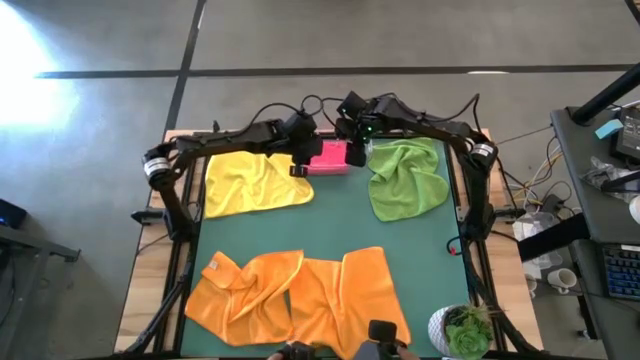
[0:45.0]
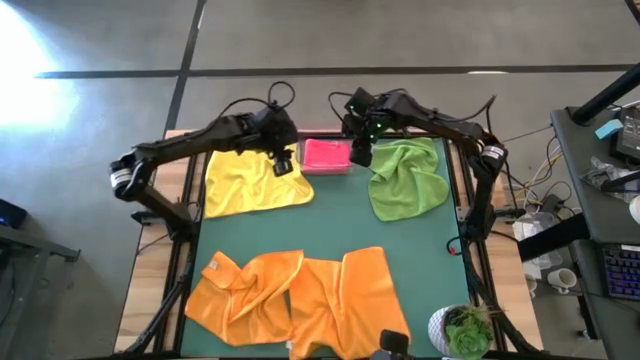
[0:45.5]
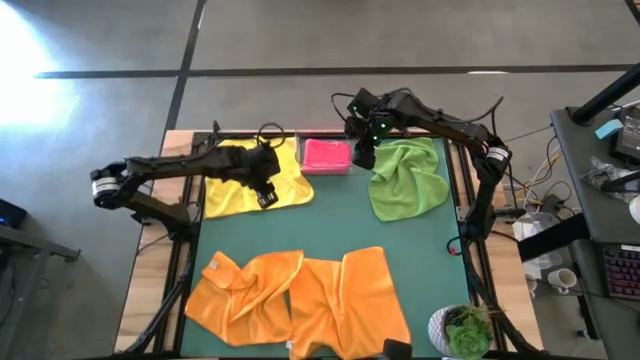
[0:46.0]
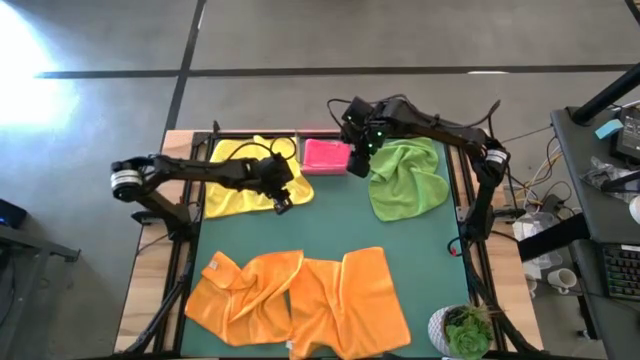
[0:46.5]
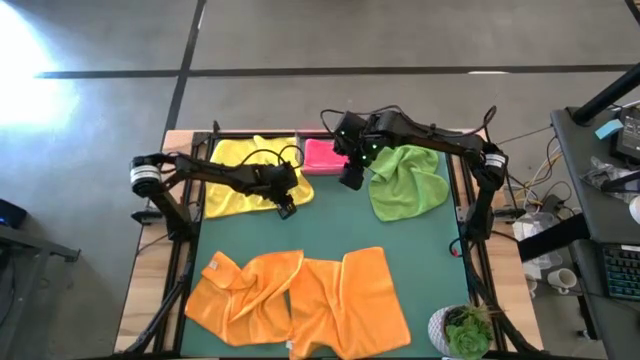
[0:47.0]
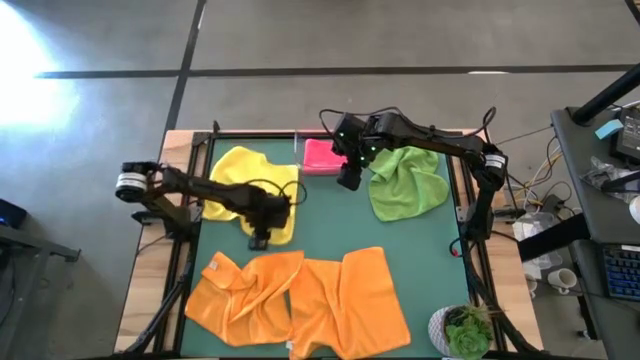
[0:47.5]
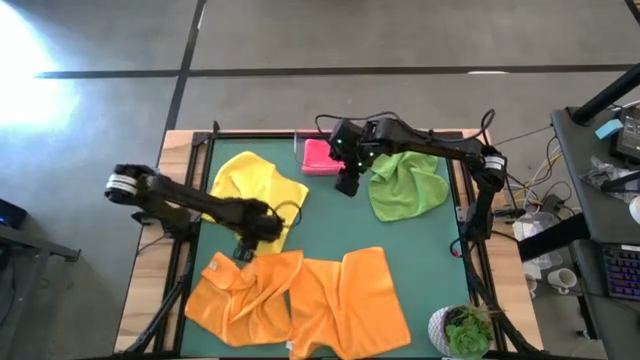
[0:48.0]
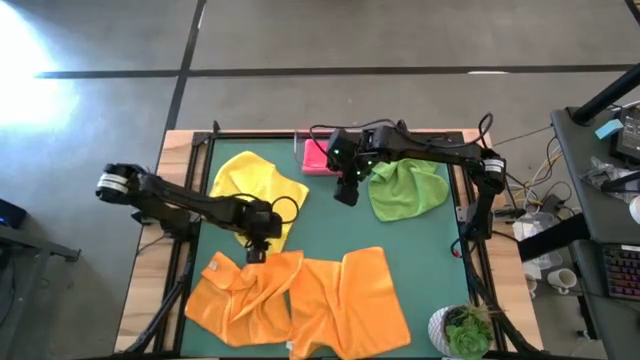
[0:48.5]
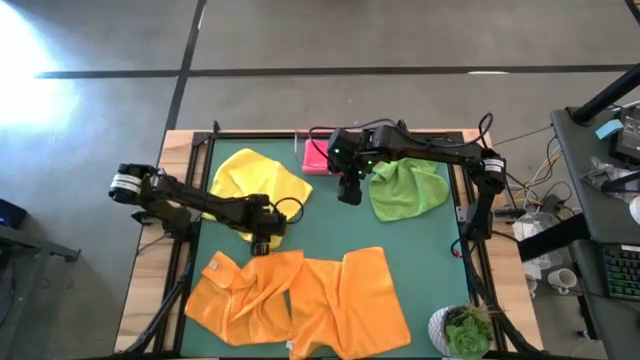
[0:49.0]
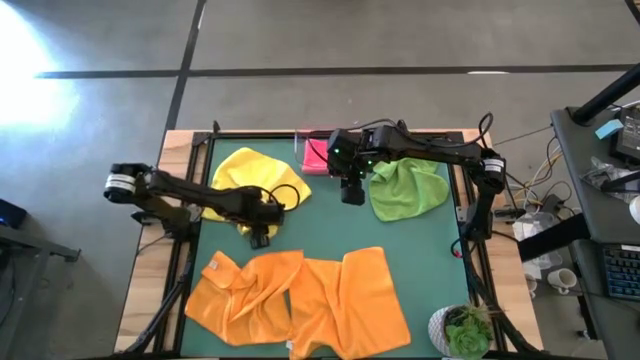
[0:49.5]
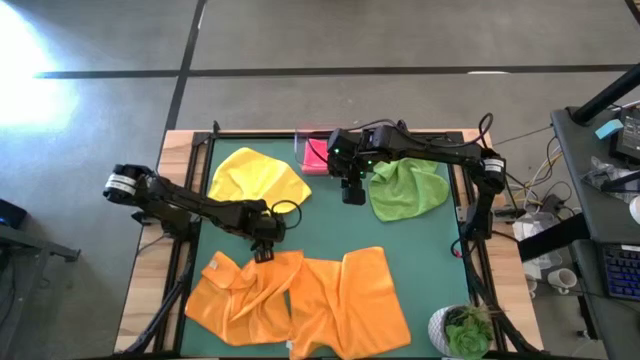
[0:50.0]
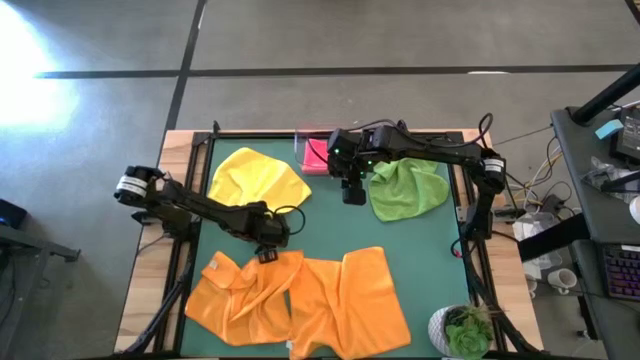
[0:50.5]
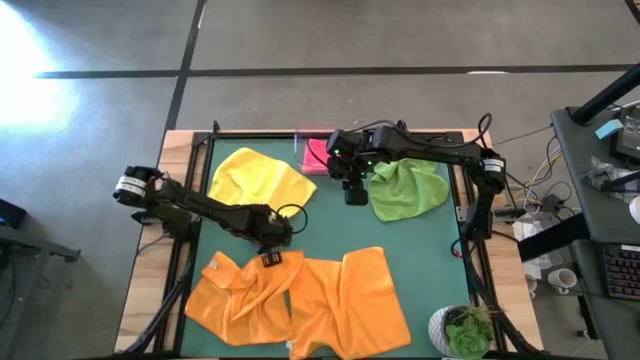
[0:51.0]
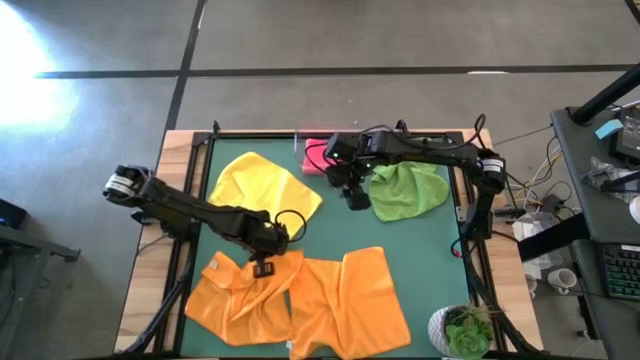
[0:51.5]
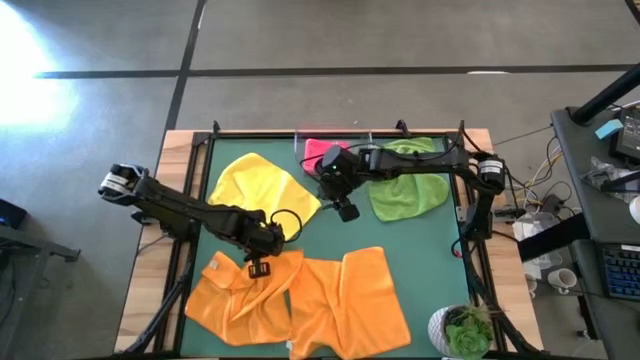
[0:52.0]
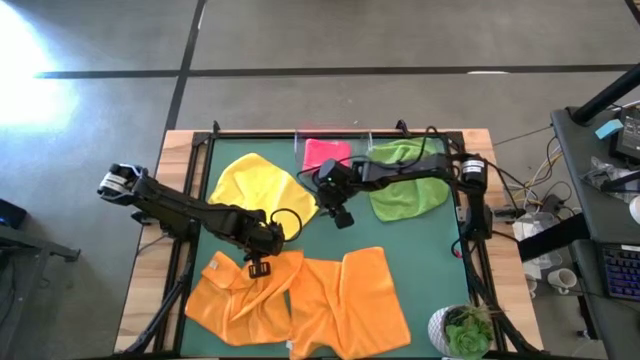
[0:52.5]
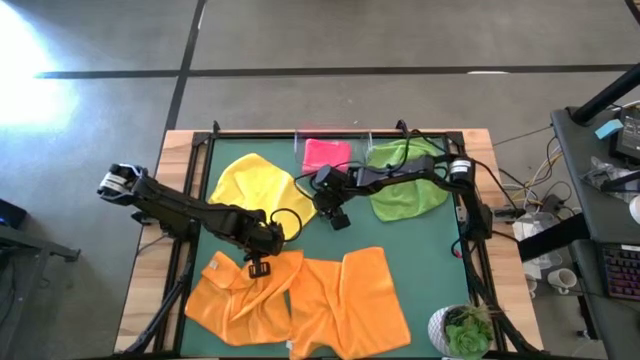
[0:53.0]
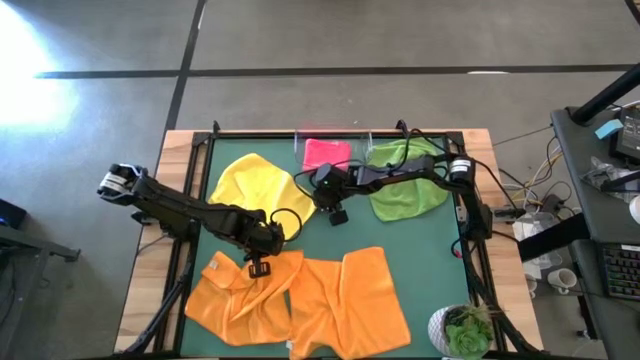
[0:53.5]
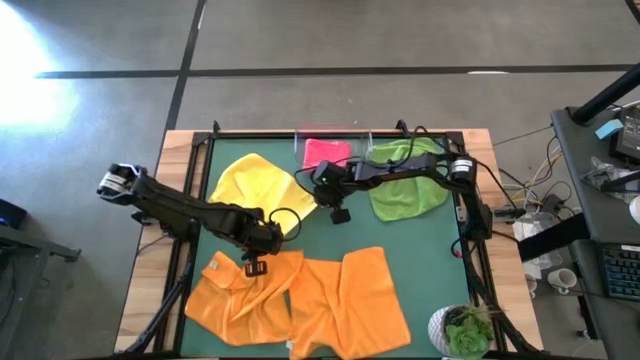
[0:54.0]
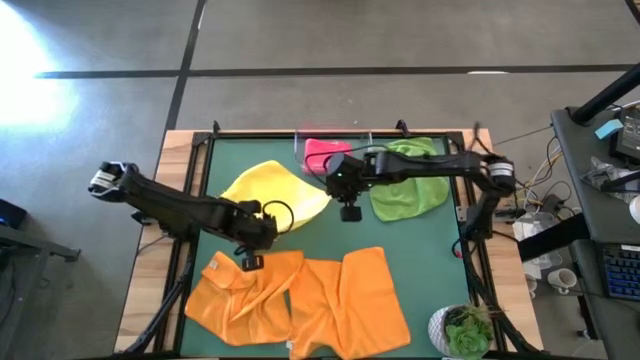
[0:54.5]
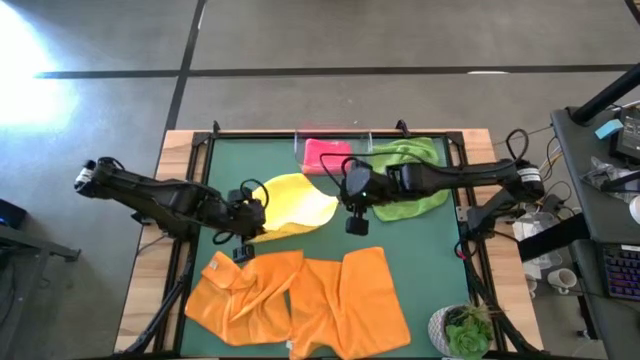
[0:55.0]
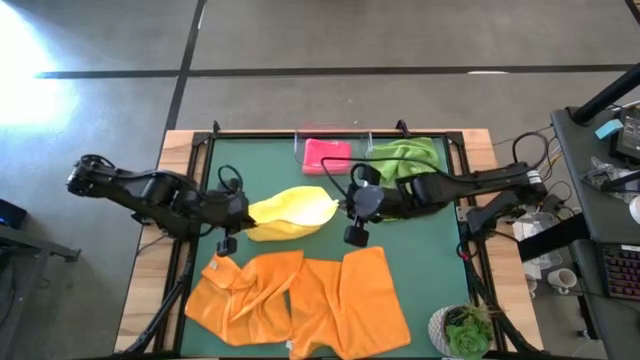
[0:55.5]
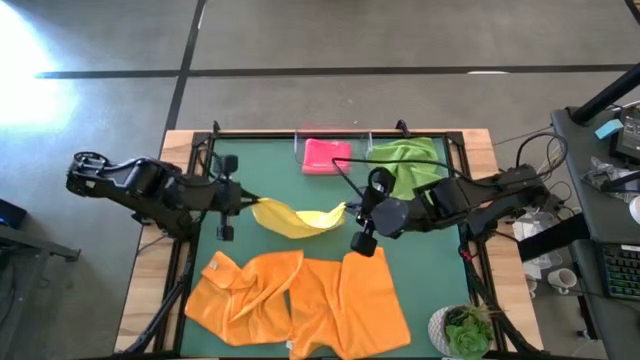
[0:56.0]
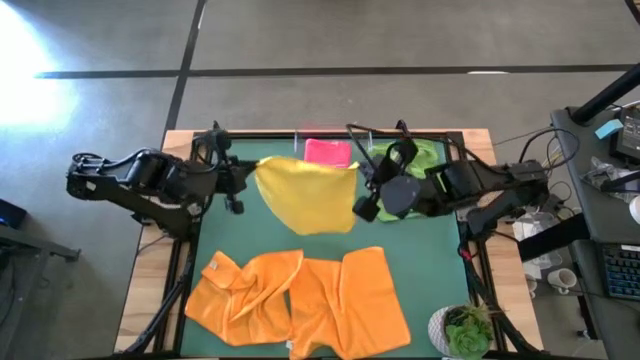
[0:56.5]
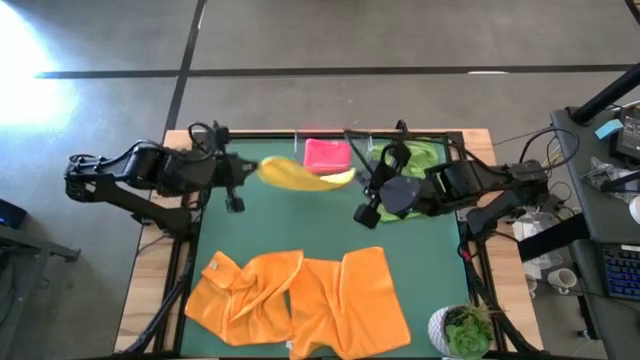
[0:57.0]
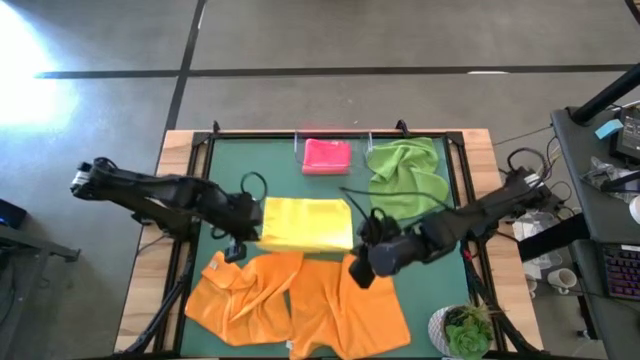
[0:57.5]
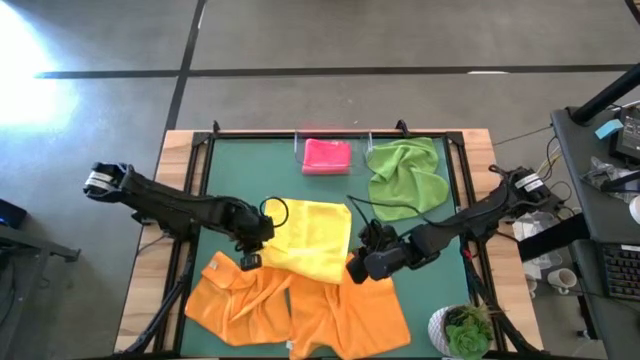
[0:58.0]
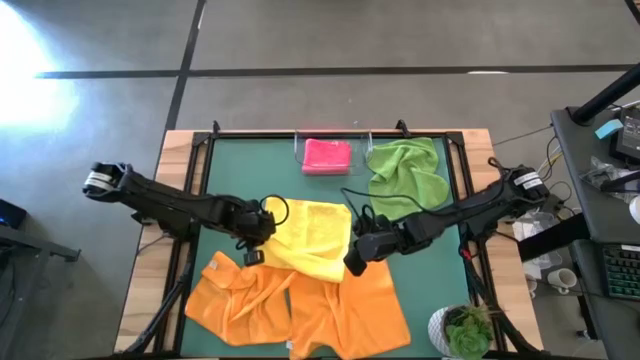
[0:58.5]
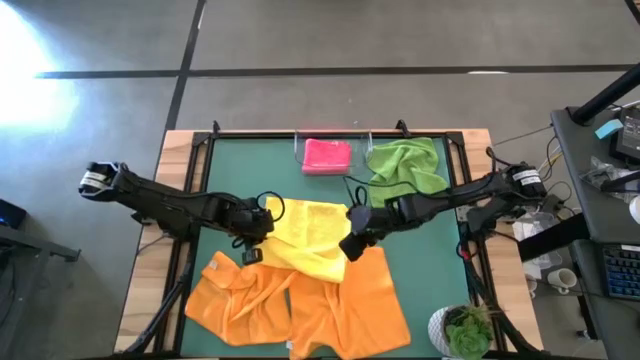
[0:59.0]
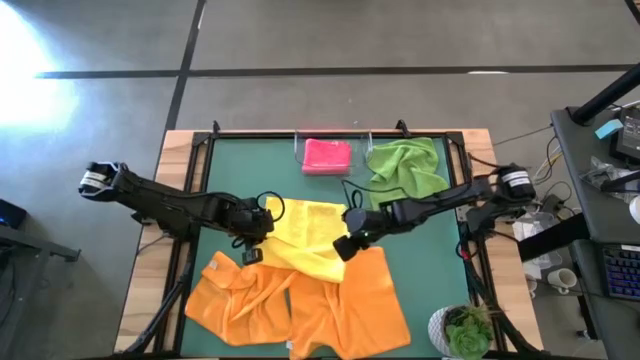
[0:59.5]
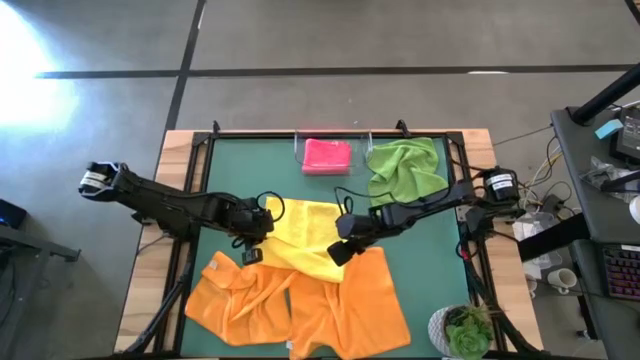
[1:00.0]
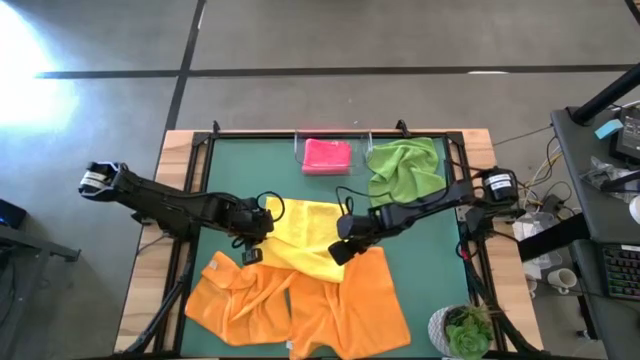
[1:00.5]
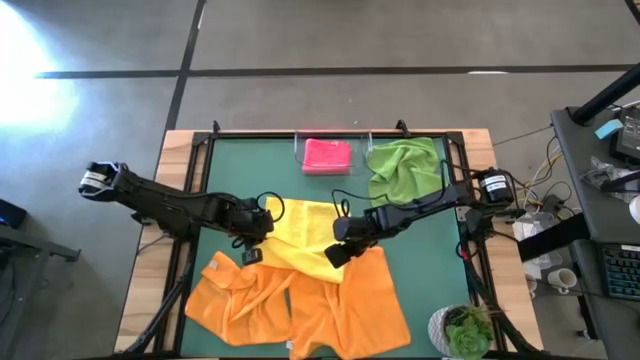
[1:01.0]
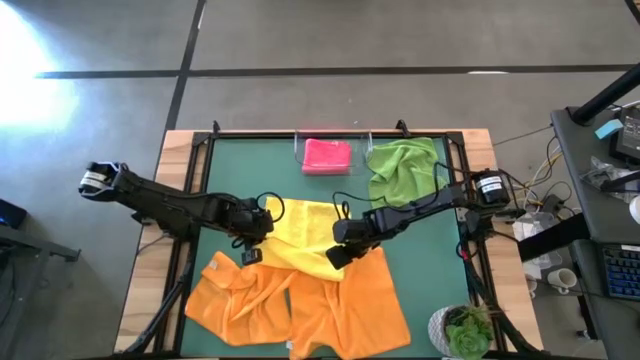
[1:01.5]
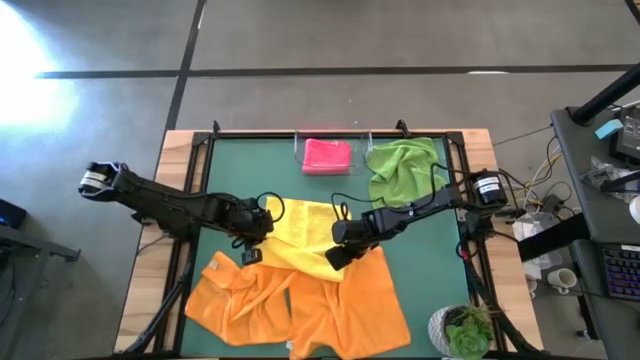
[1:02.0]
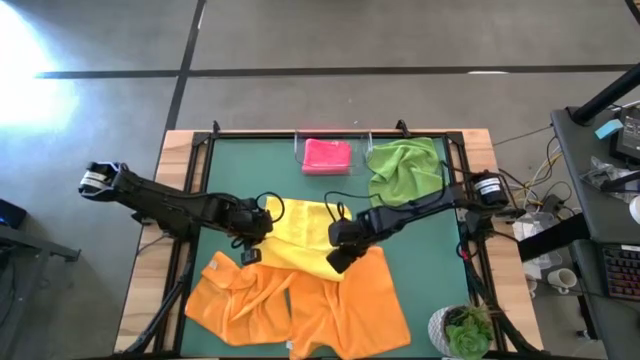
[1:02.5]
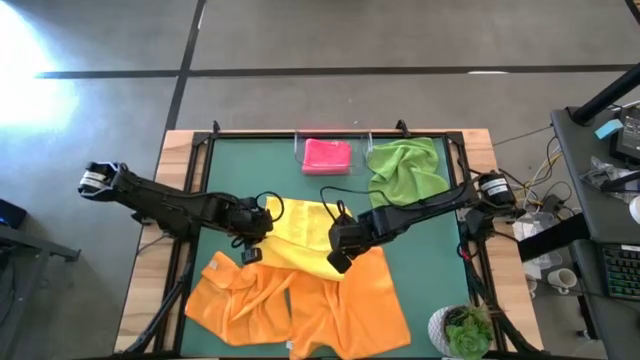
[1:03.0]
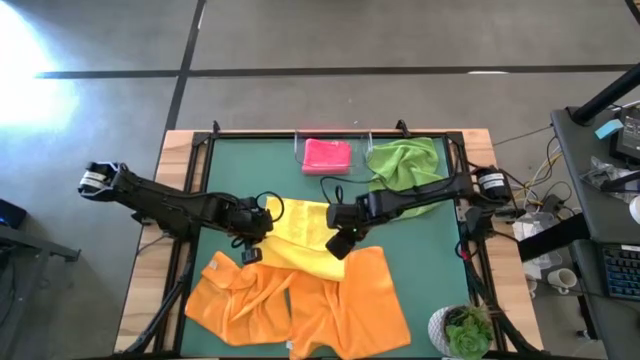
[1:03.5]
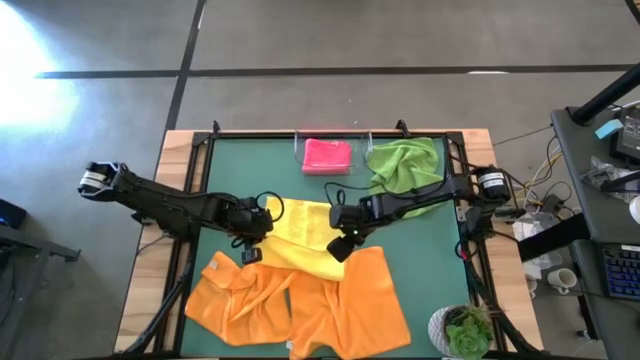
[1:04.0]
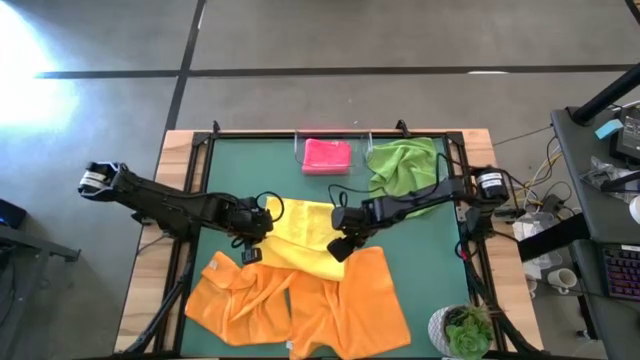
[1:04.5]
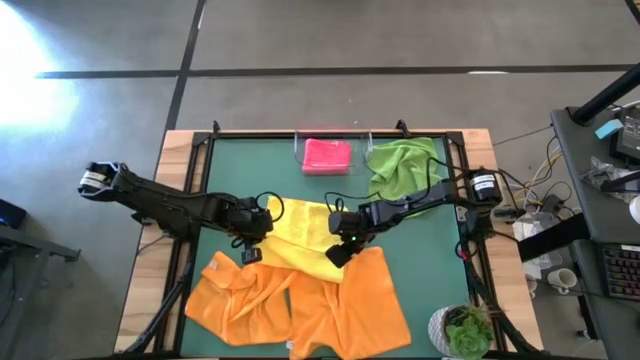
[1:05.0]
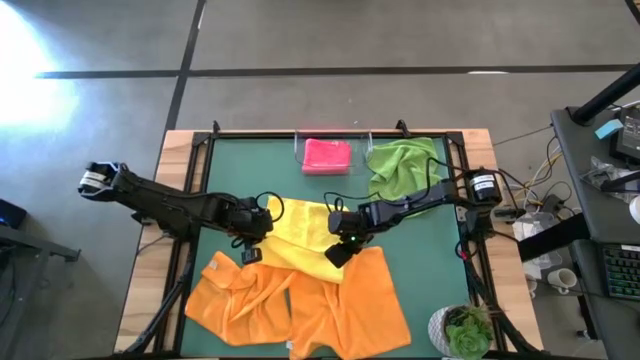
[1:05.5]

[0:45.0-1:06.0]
Task: Fold microfiber towels
Fold the yellow microfiber towel
